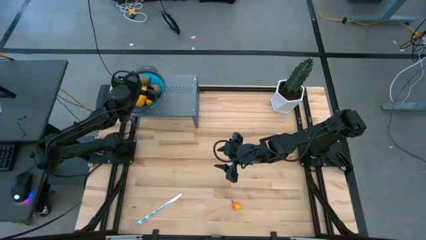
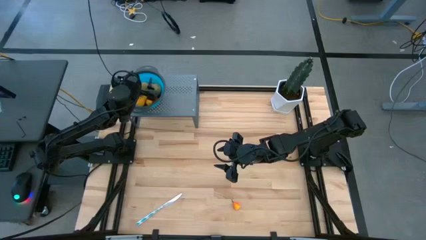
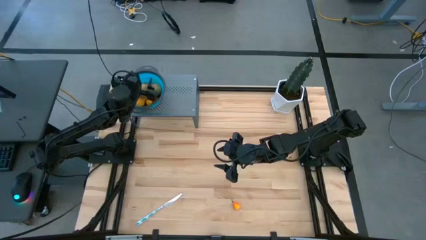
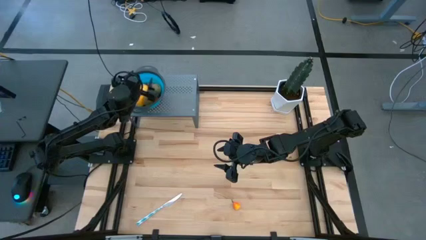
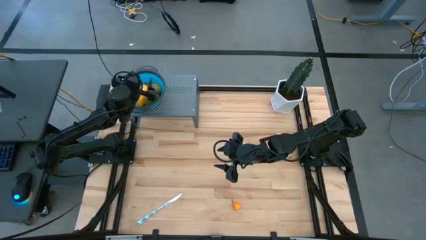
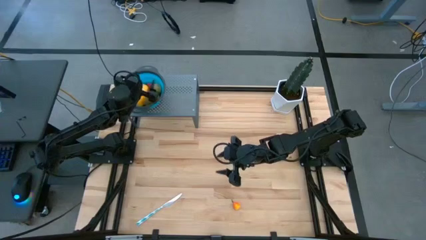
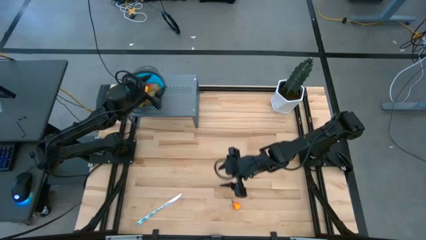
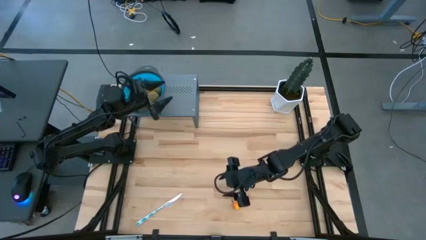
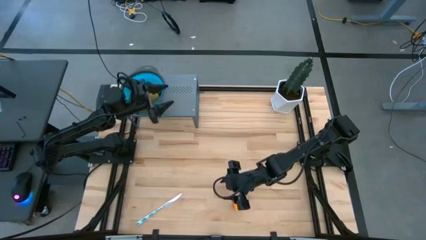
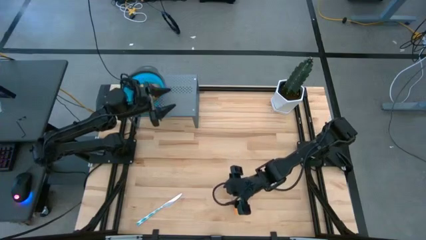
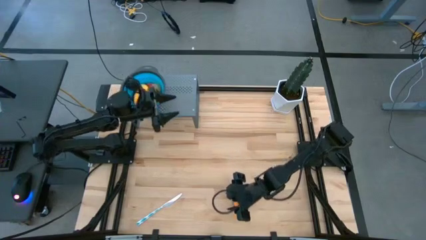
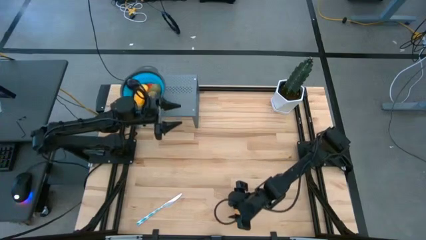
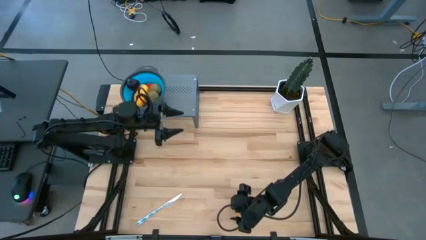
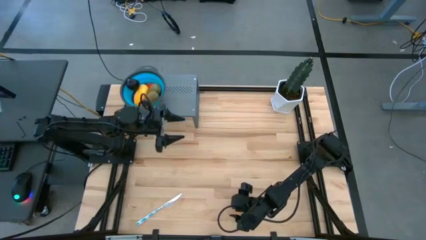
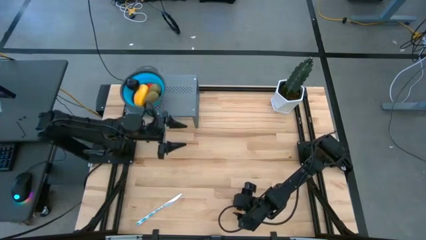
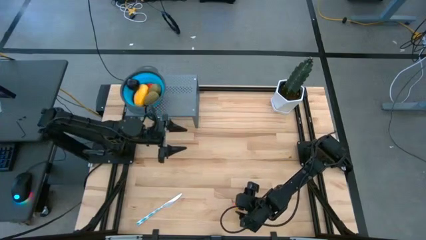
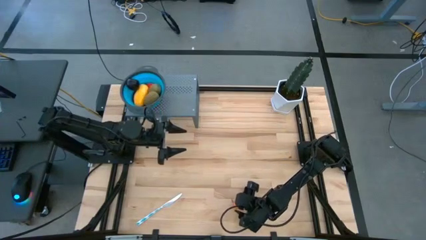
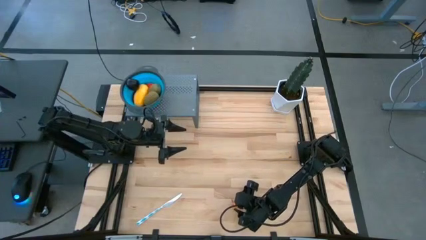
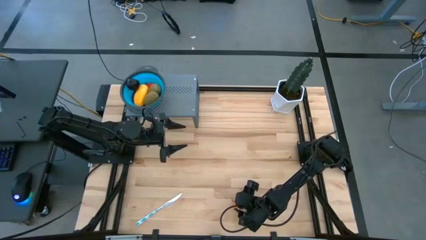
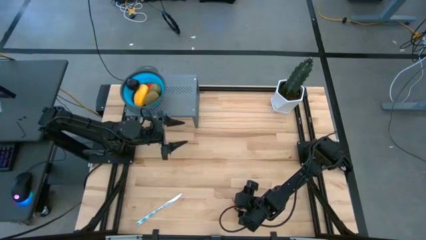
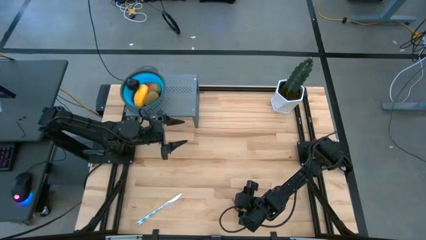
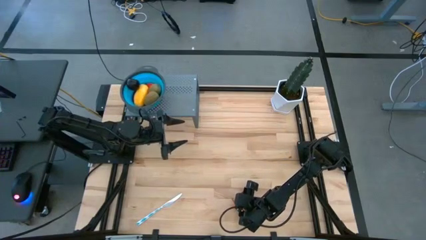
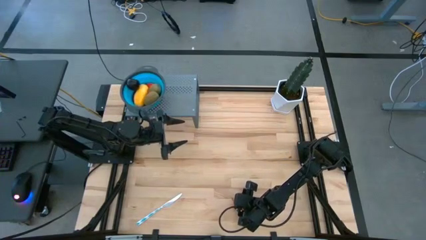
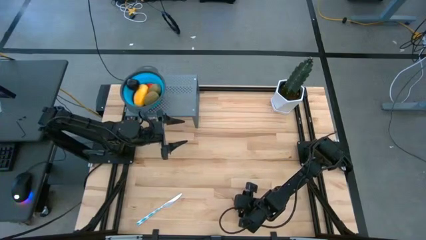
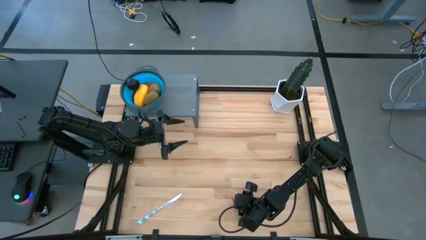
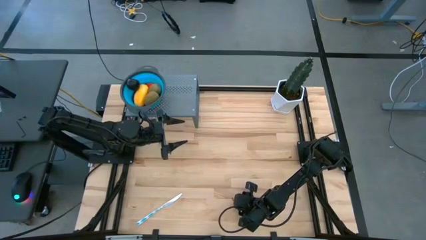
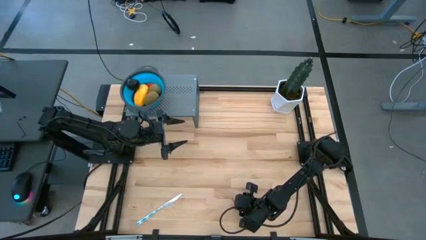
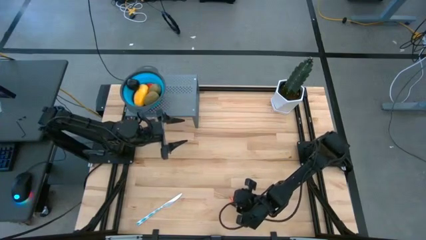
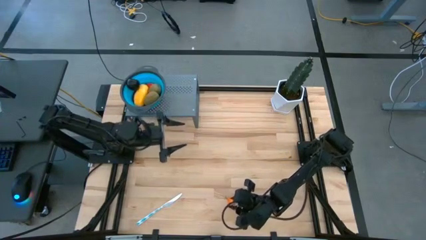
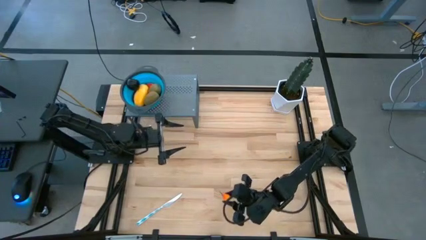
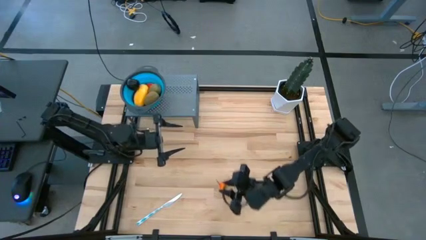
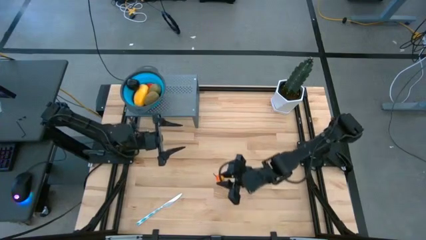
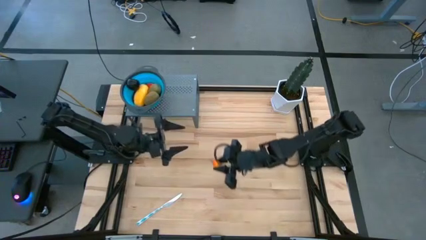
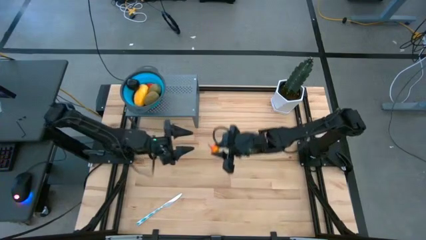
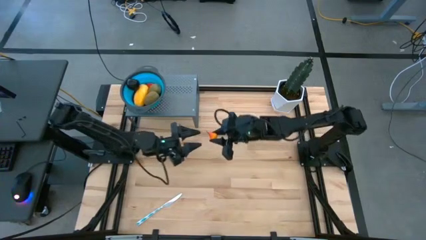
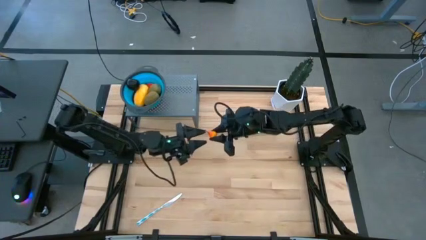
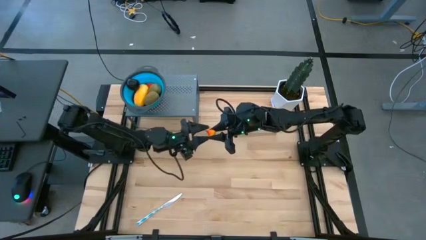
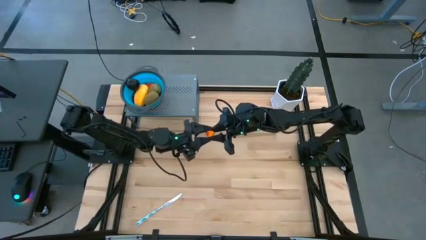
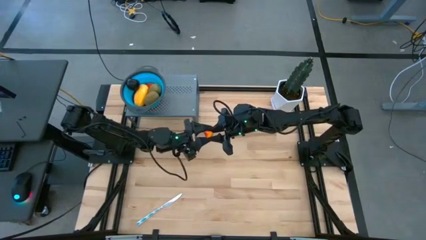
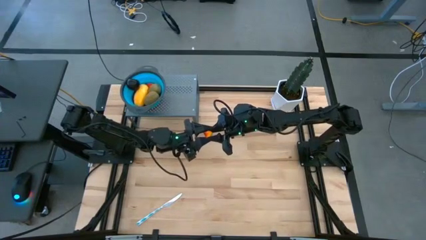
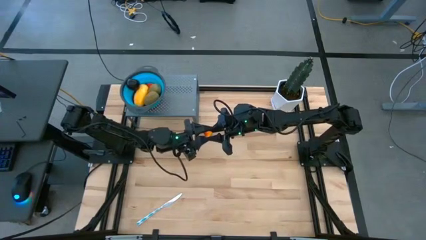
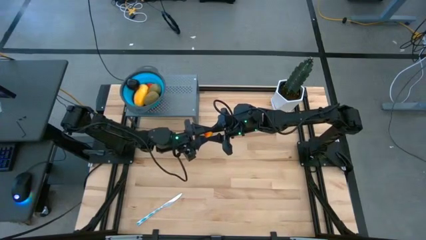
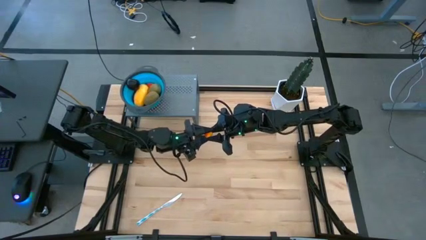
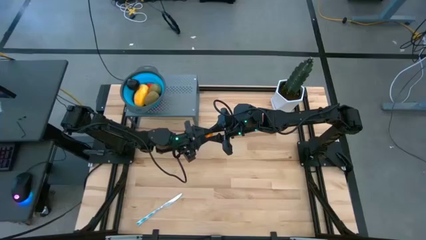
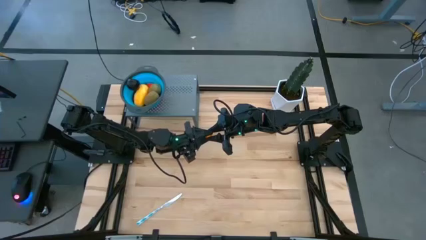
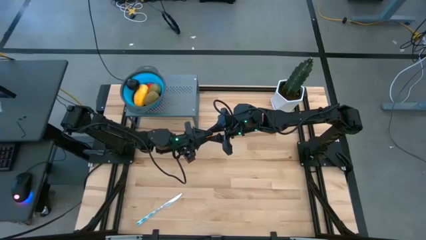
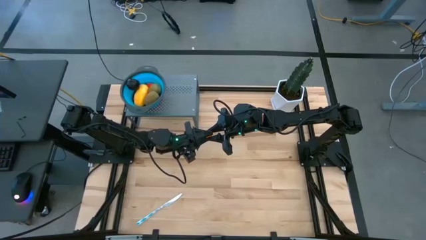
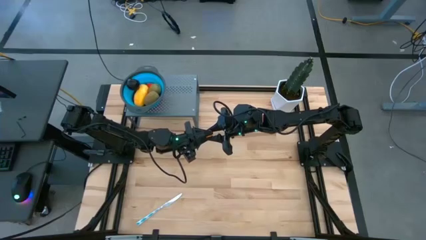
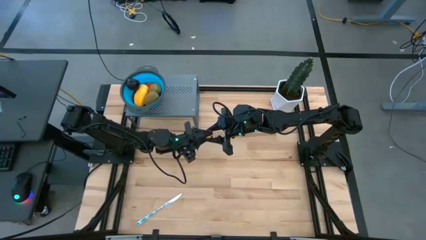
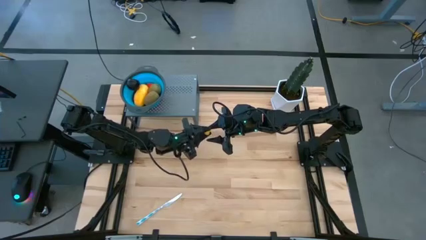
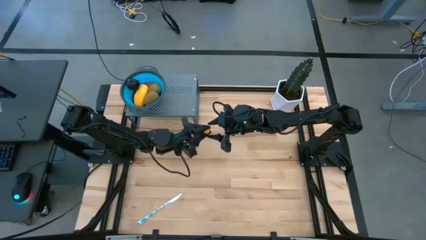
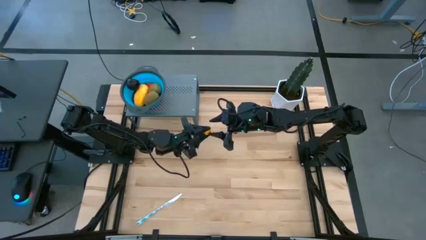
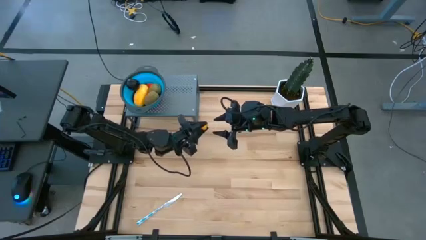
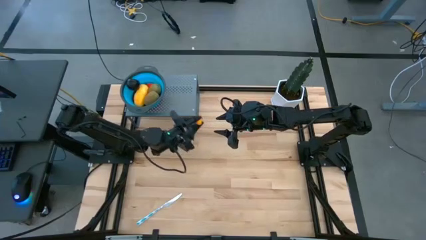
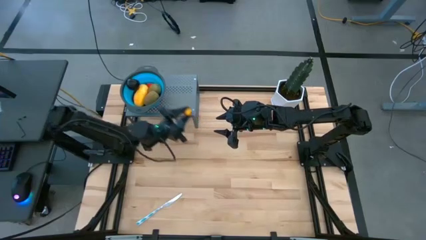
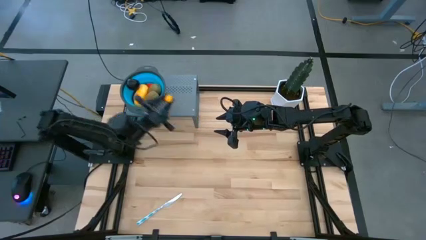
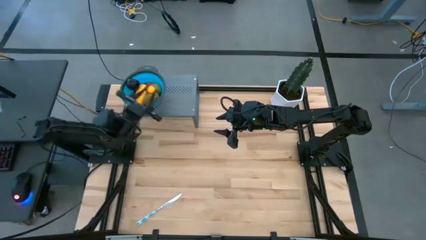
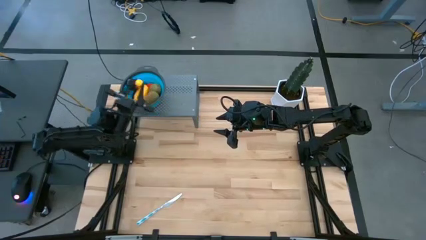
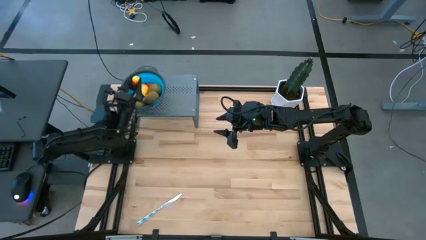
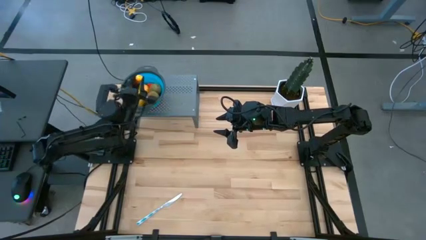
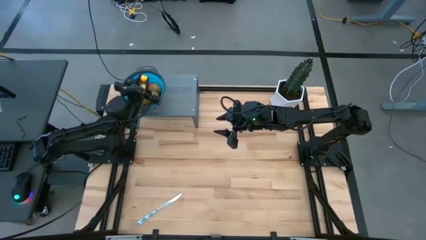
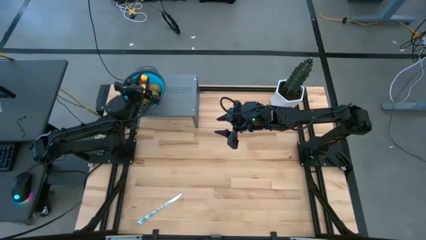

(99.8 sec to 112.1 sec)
Task: Pick & Place Fruit
Put the orange pear into the blue strainer bowl on the shelf

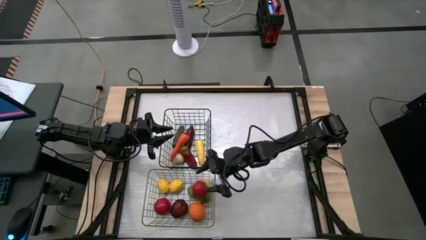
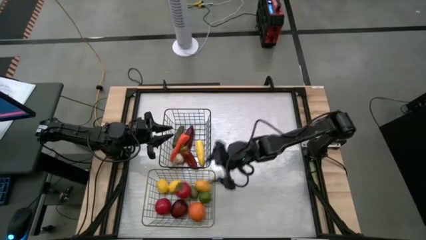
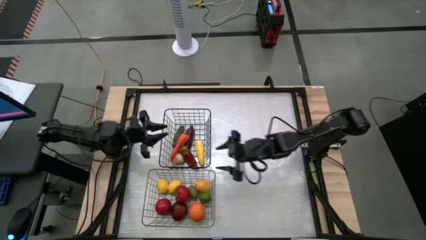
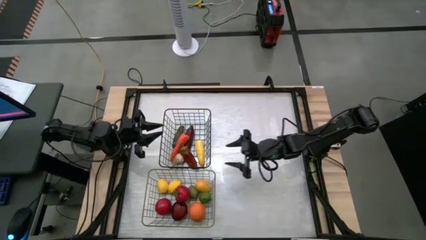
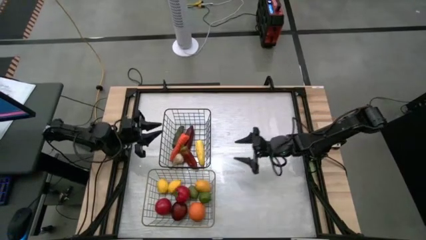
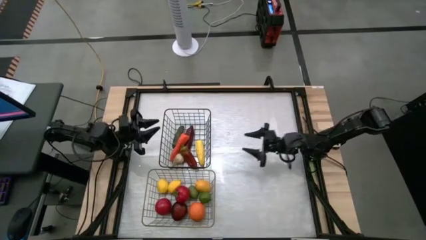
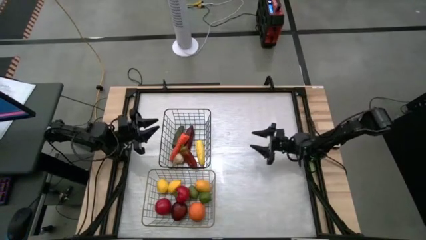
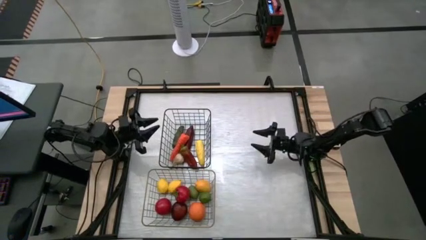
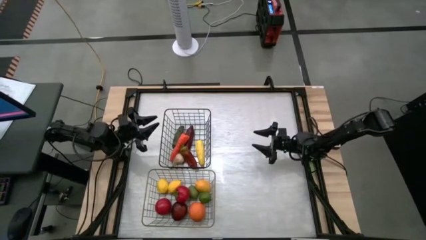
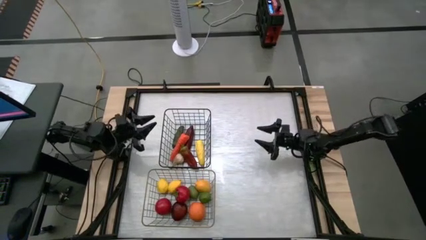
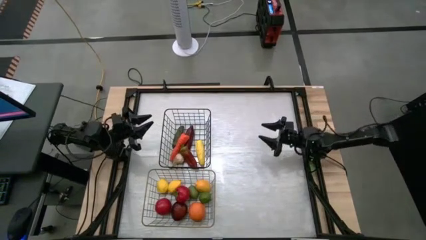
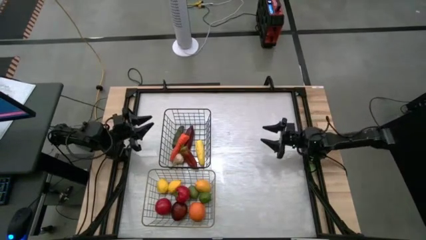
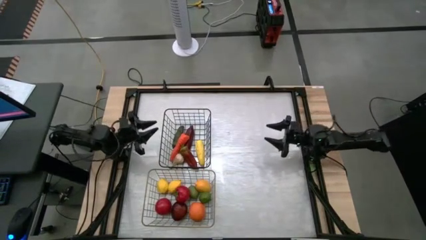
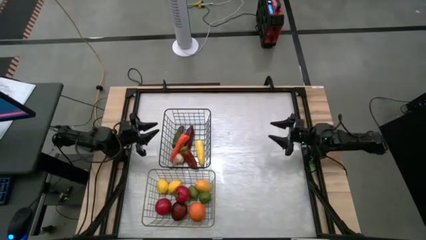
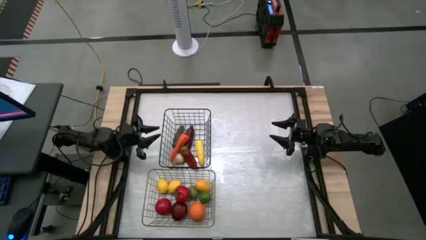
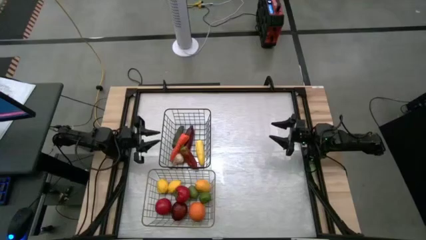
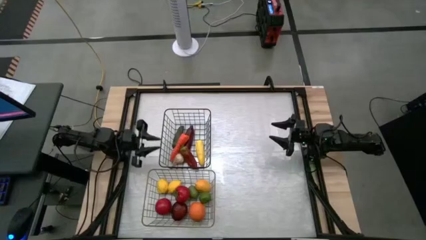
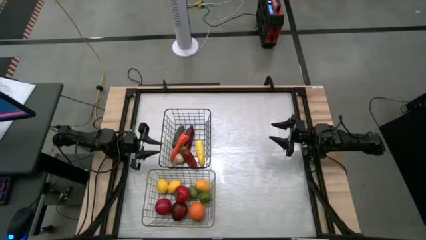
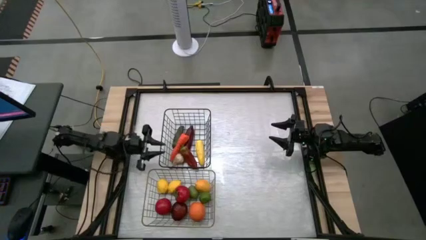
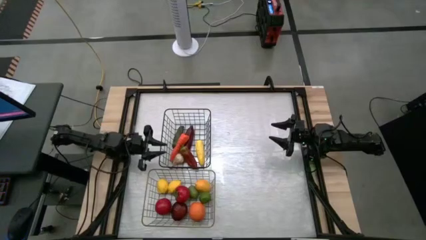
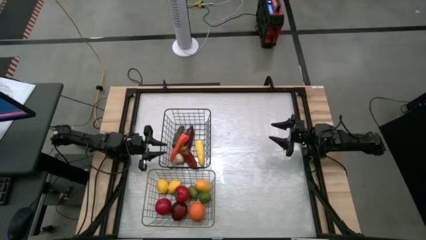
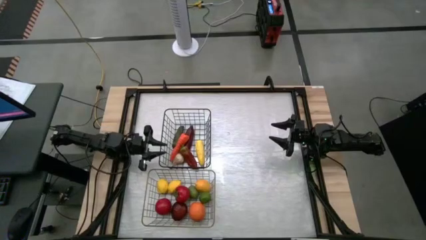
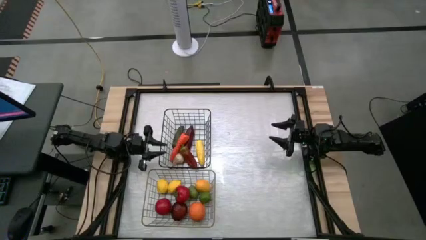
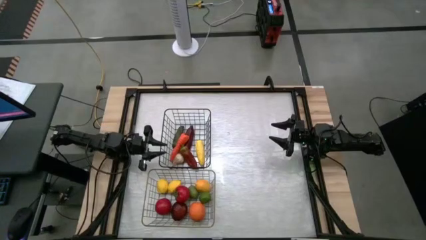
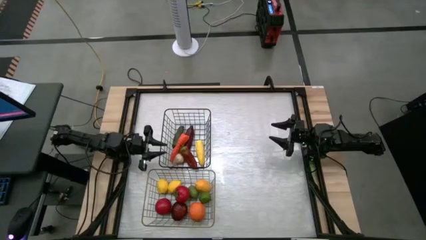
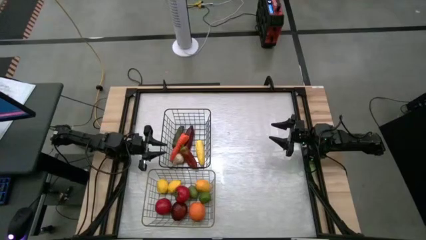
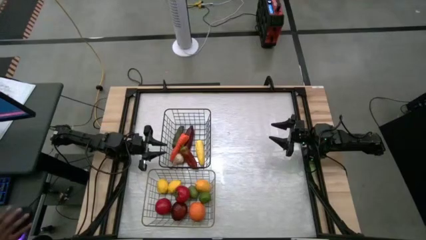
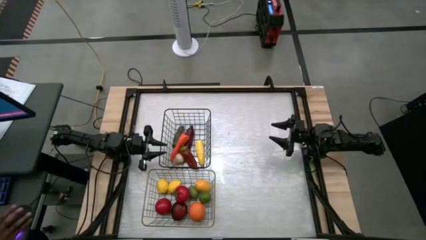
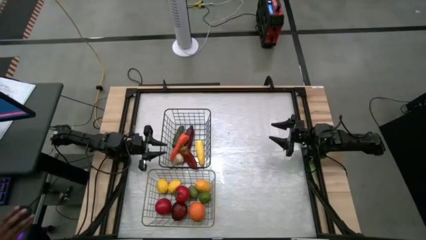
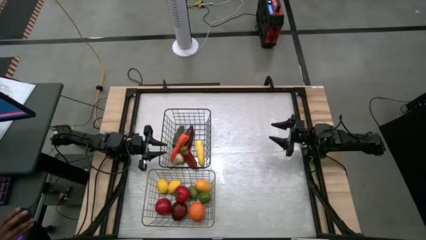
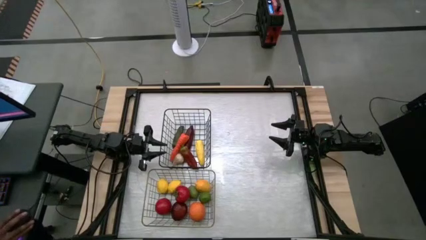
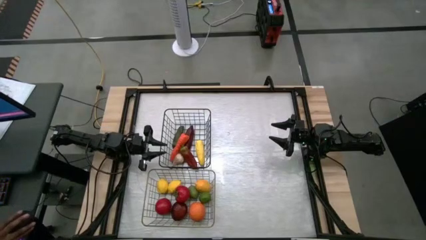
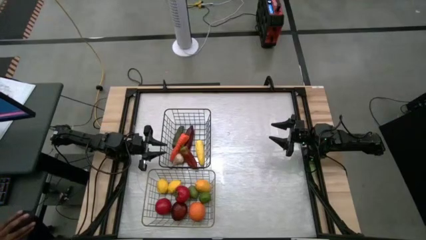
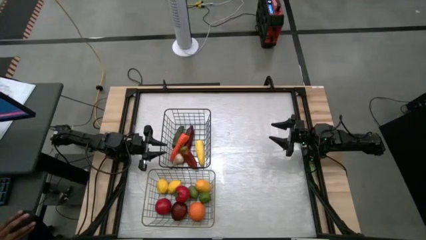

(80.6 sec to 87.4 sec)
Task: Sort produce into baskets
Return to Home Position
